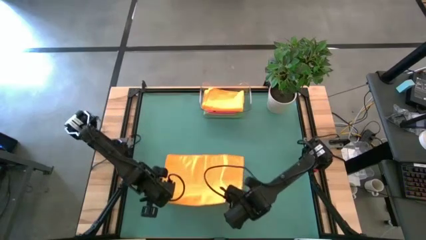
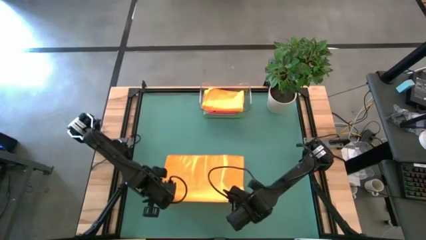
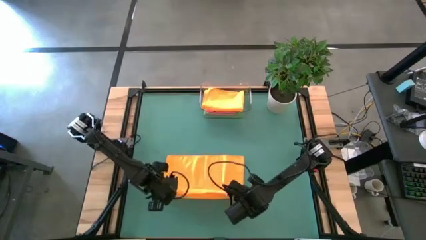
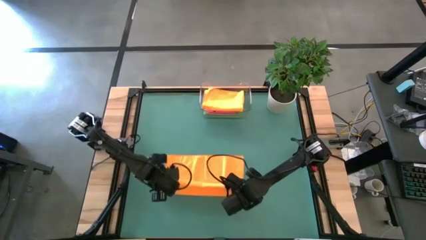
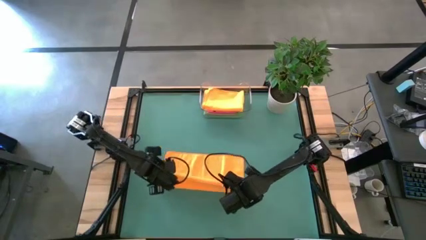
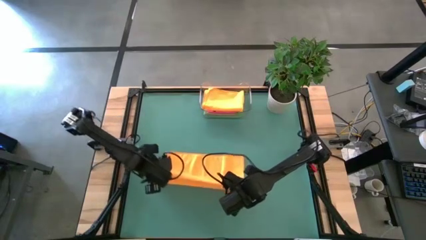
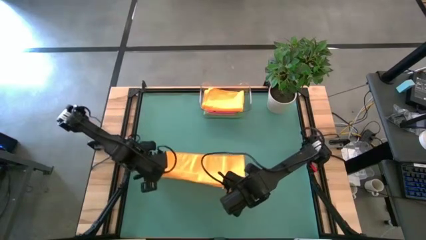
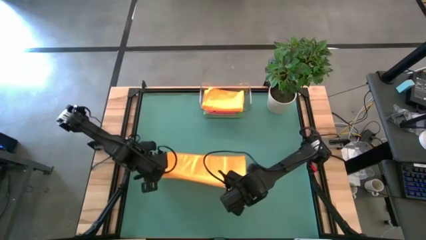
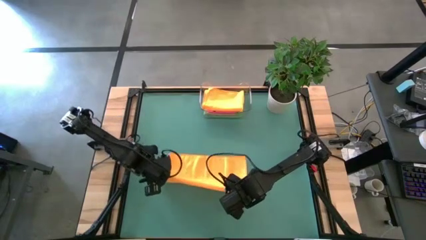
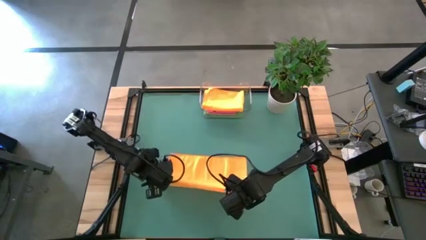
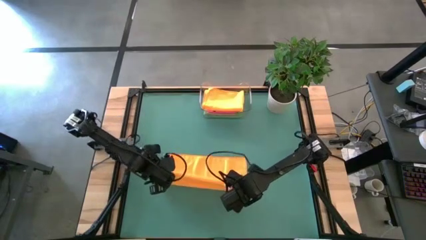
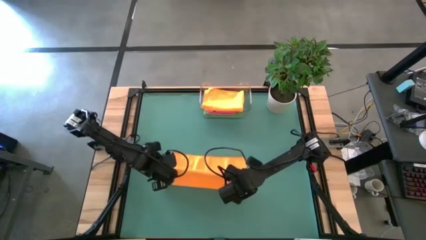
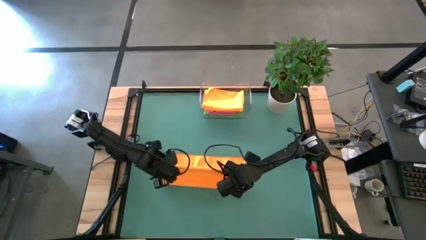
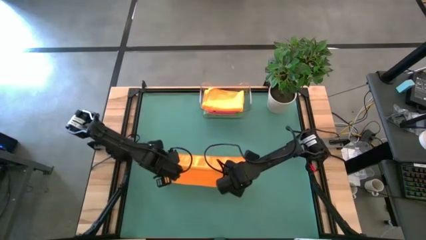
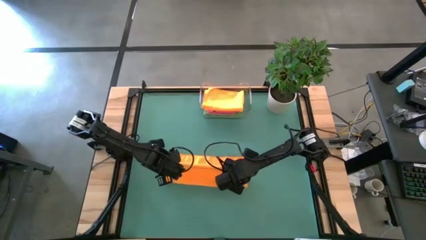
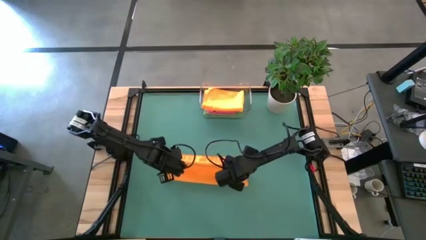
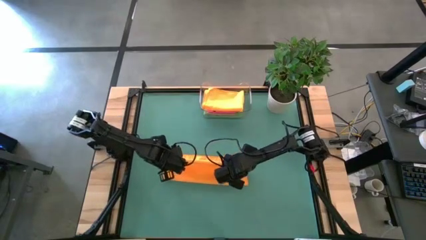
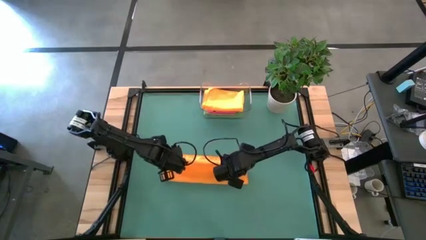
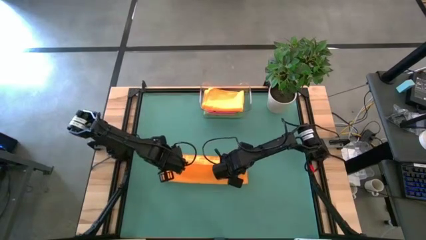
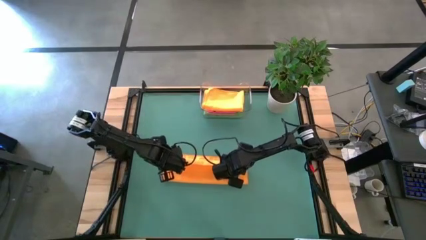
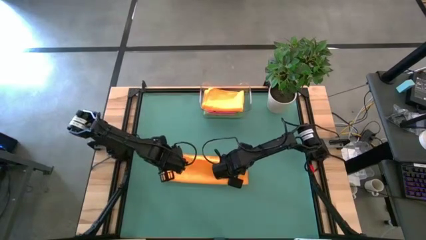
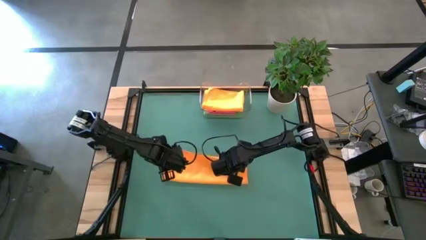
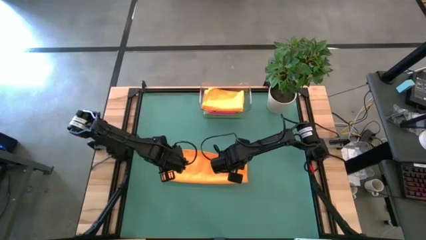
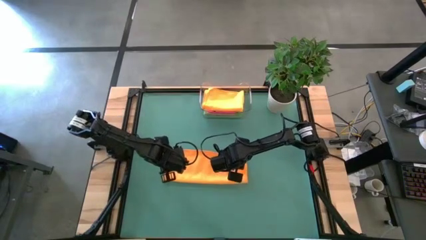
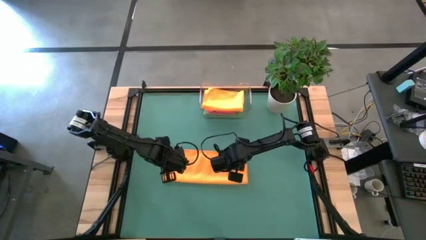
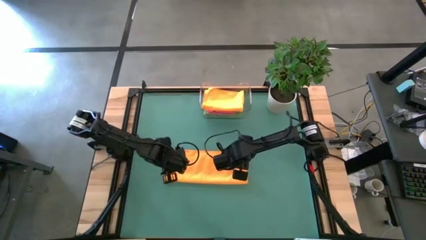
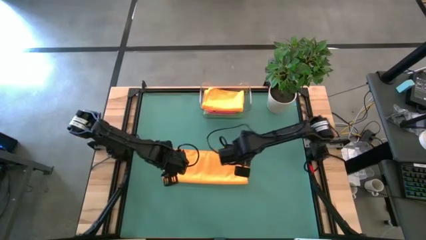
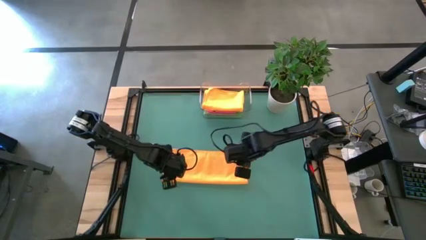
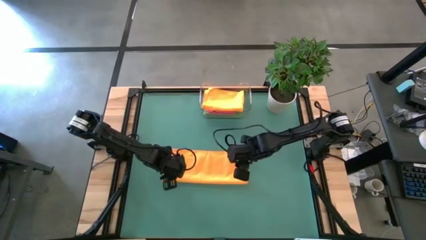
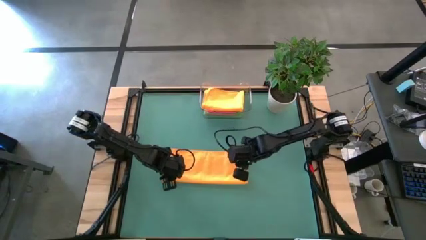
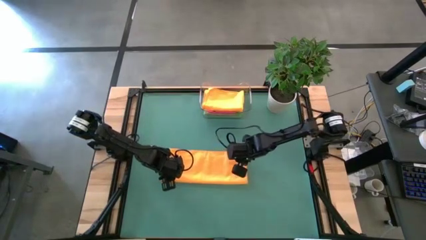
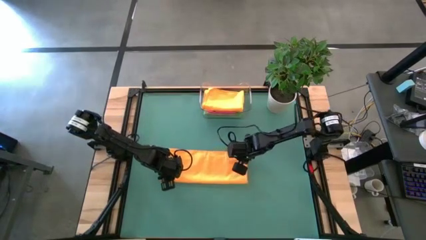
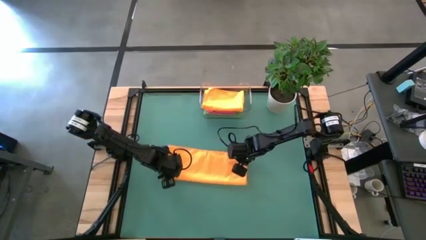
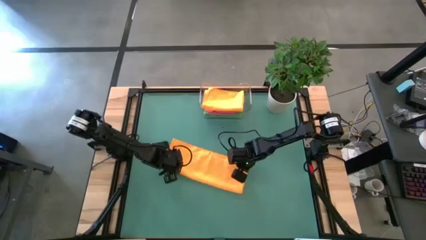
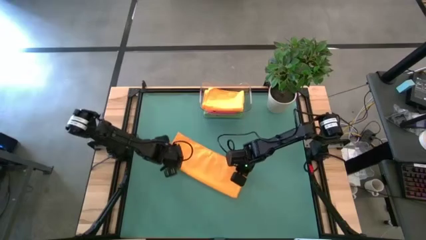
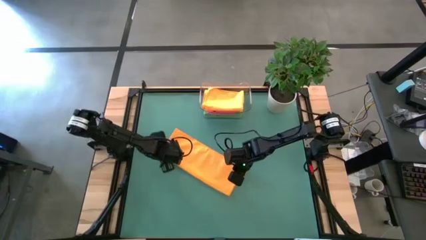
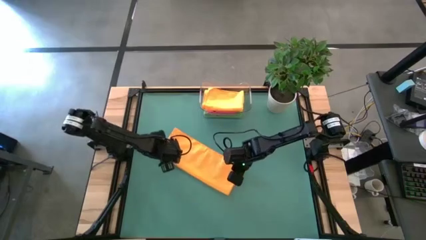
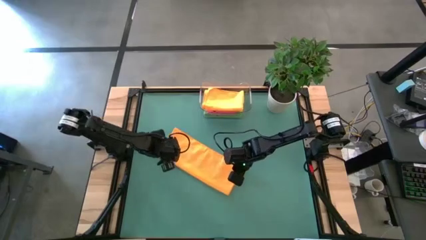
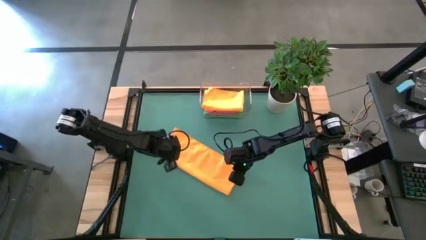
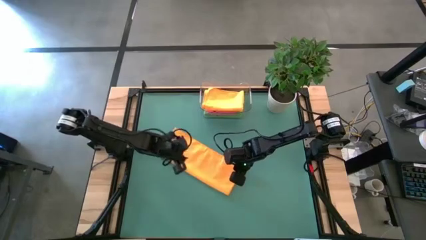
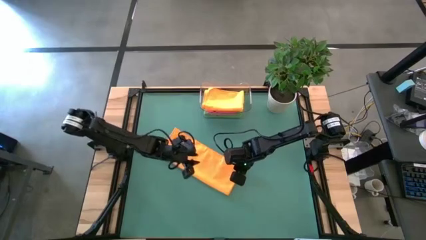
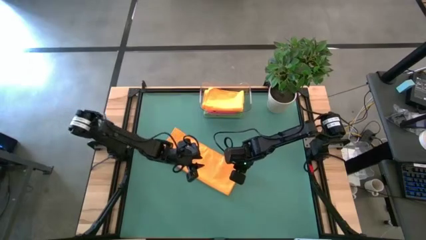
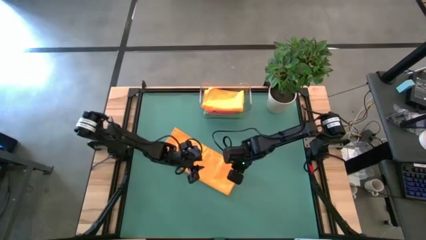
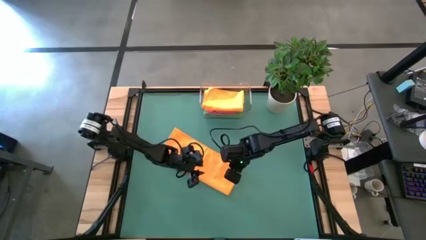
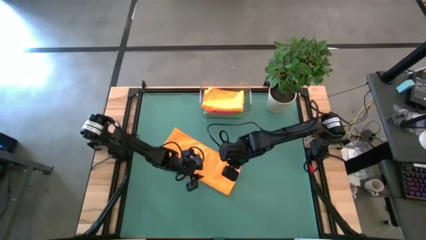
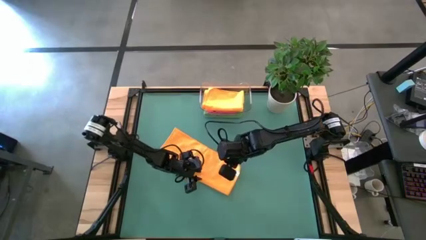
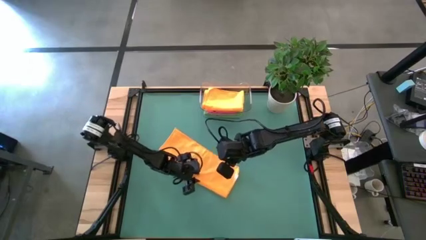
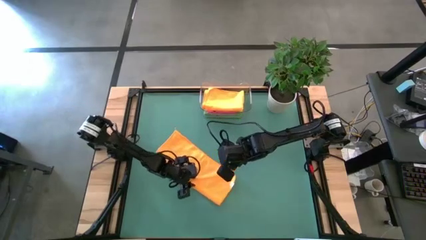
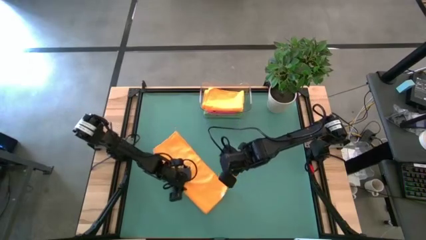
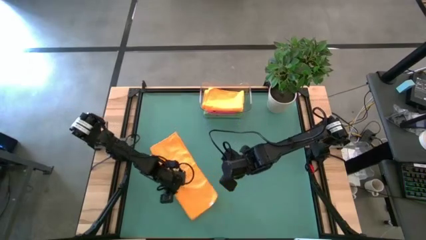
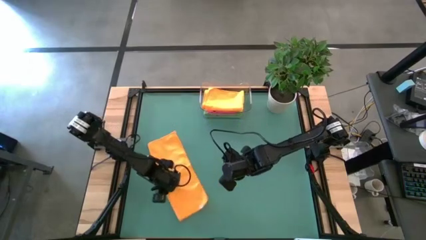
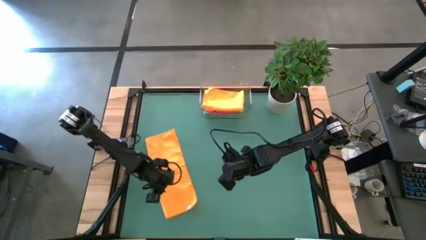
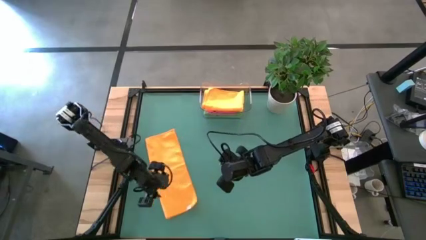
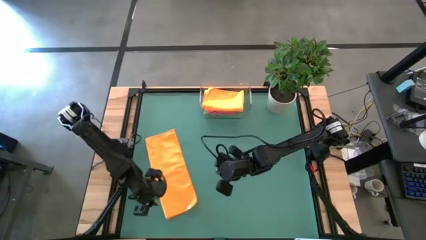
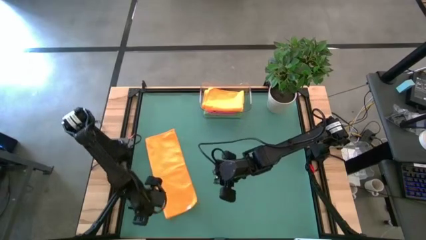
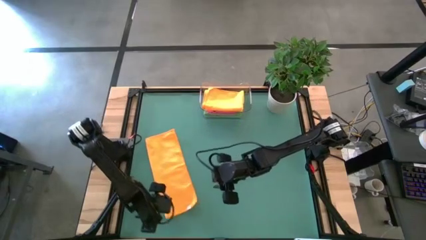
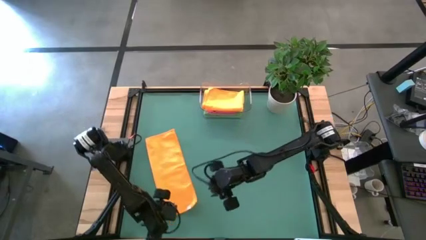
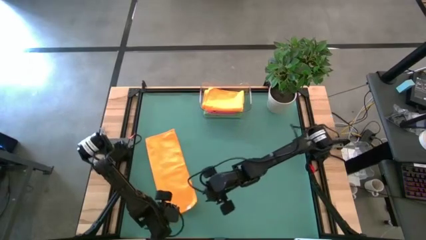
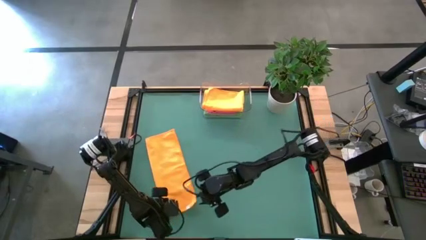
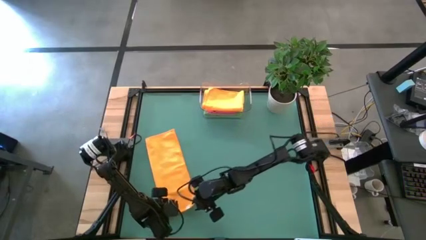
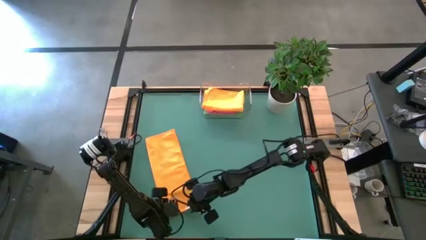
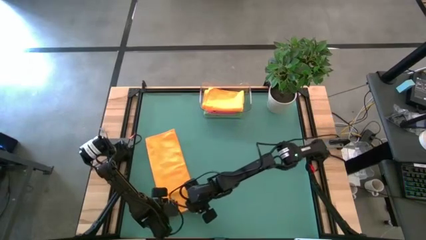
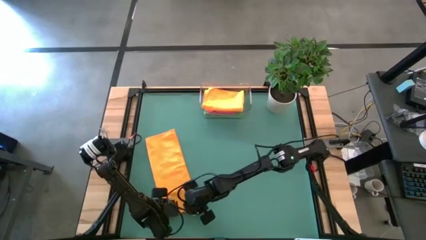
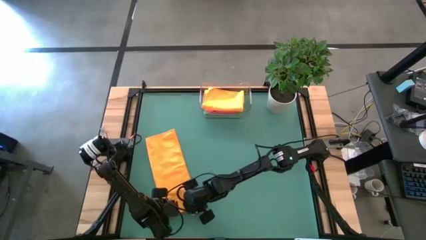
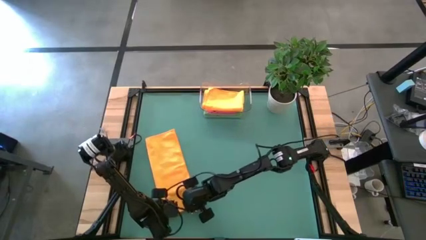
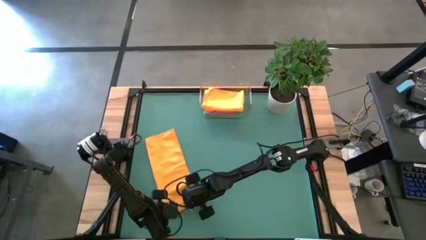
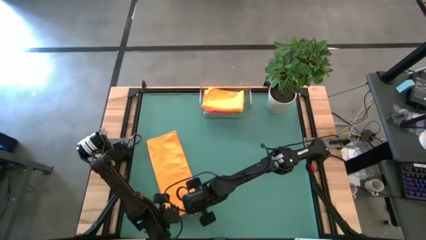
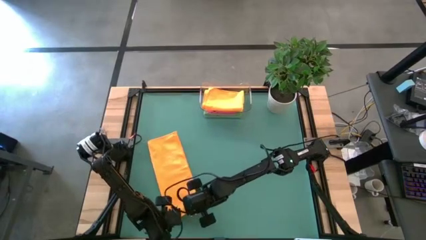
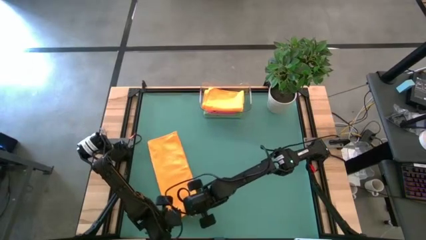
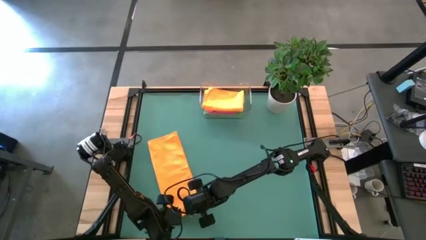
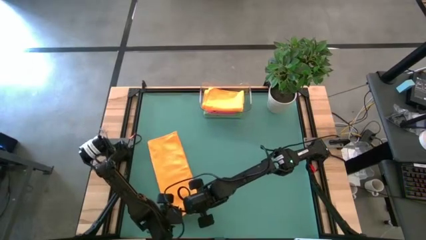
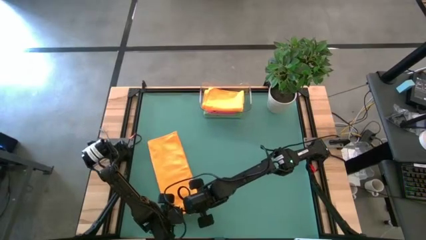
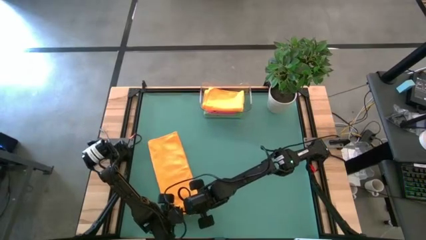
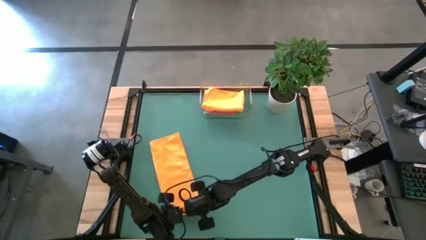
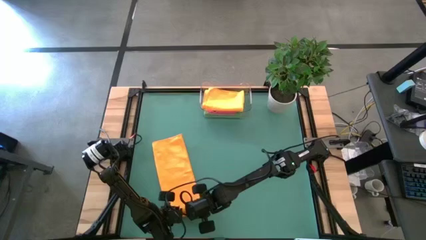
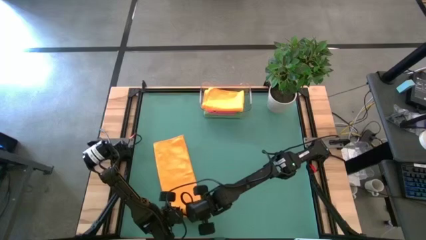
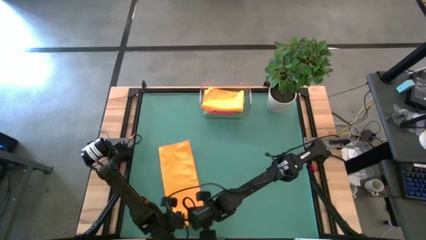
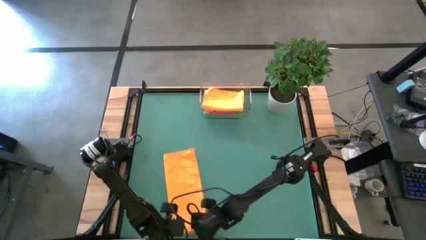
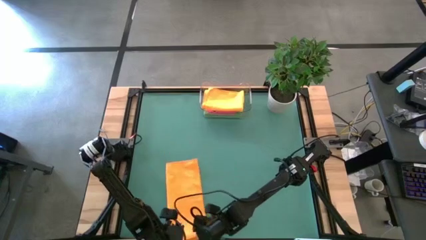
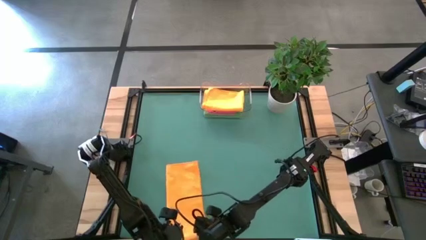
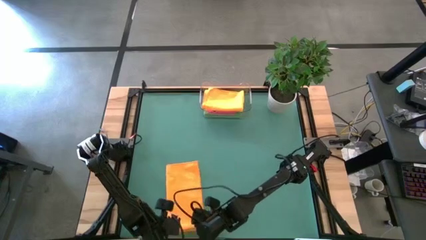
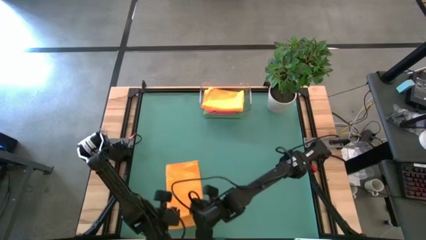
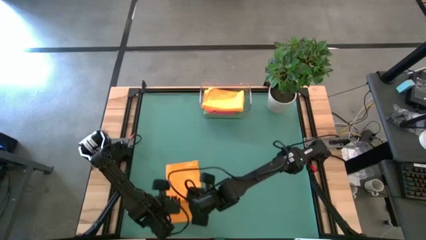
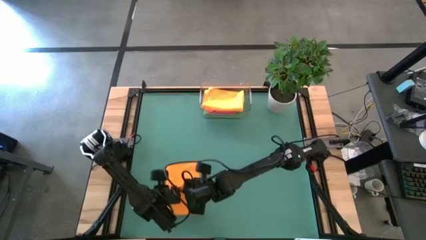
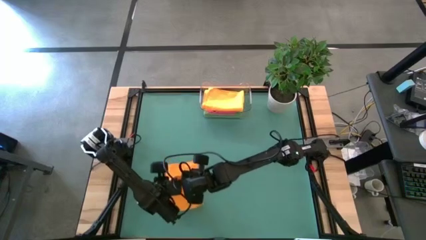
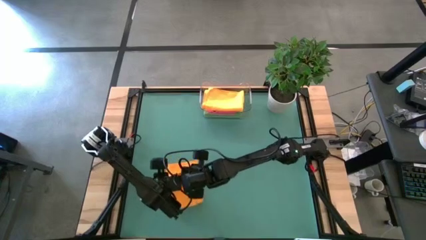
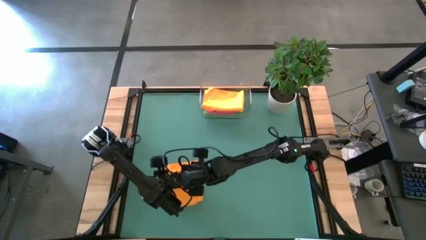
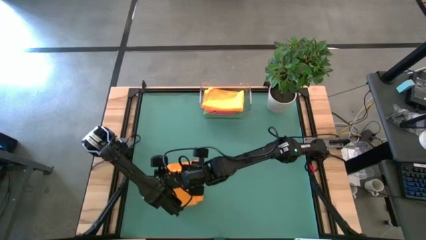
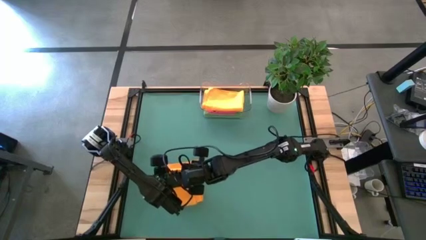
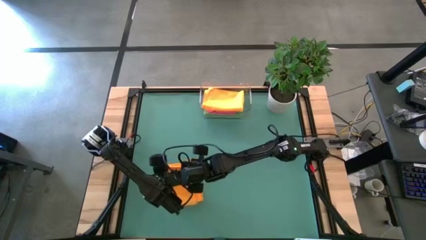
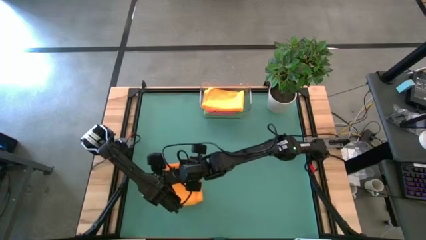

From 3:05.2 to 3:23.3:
Task: Fold microfiber towels
Fold the orange towel
